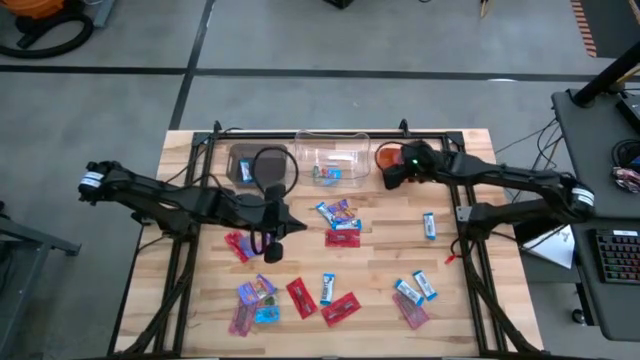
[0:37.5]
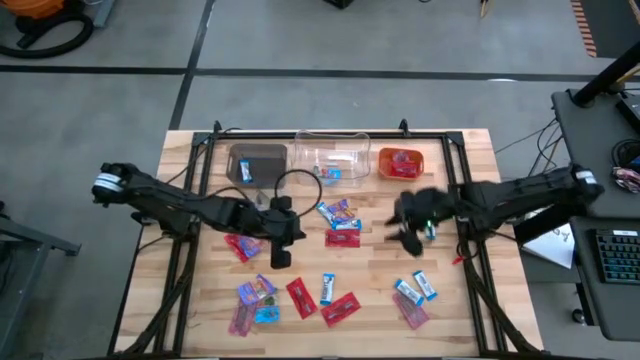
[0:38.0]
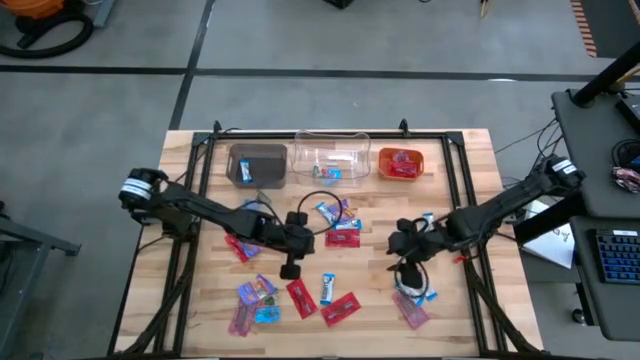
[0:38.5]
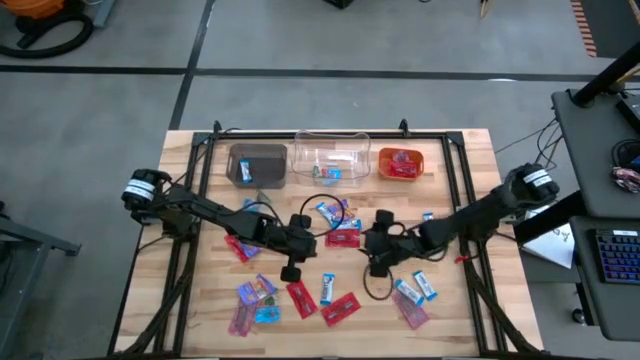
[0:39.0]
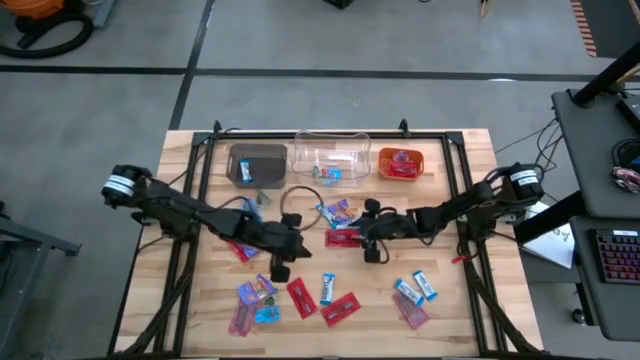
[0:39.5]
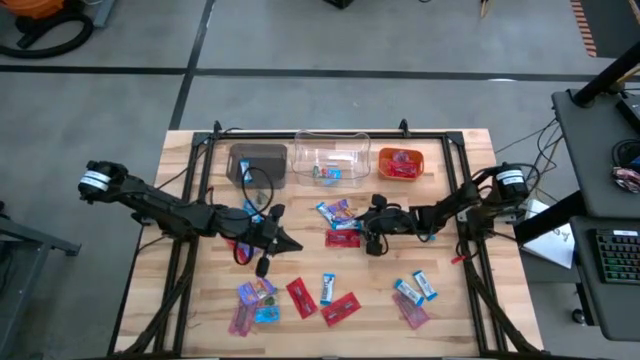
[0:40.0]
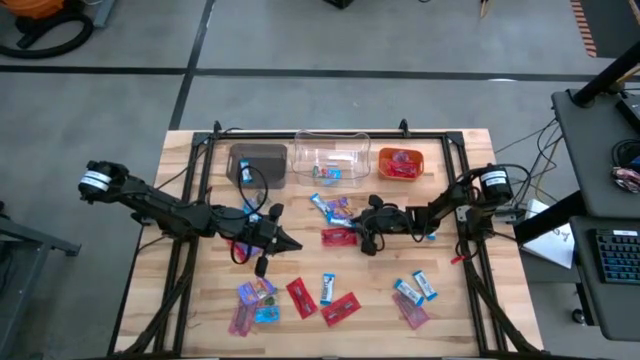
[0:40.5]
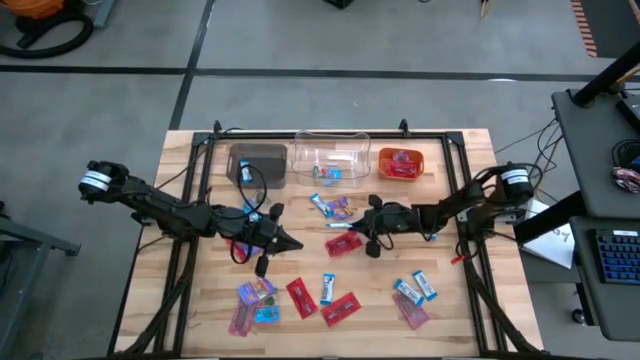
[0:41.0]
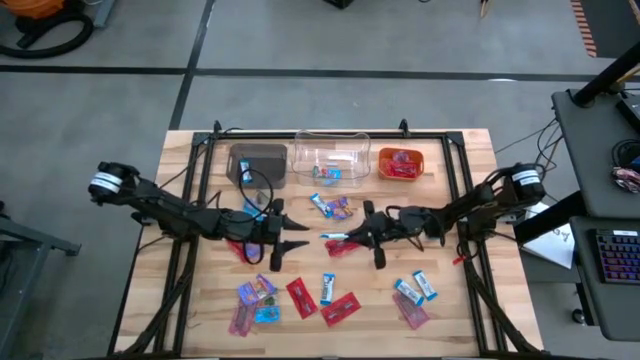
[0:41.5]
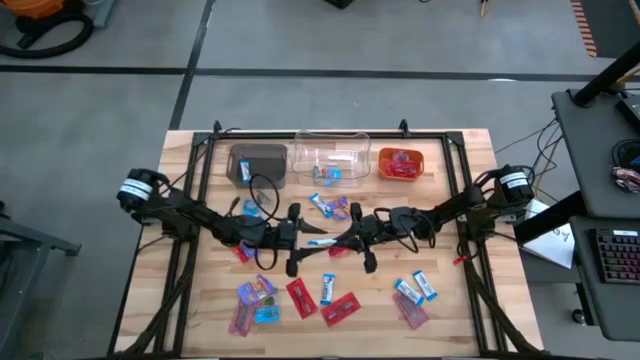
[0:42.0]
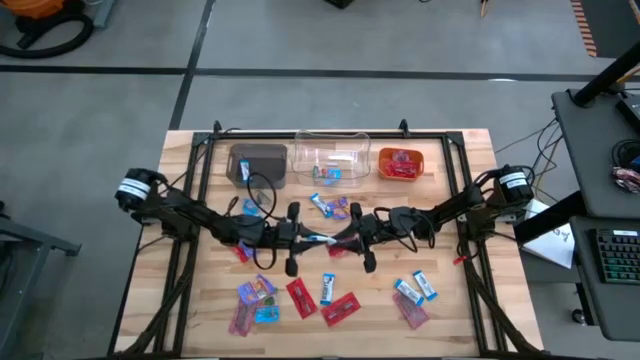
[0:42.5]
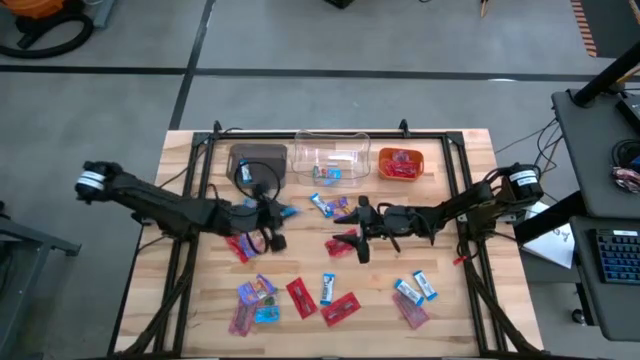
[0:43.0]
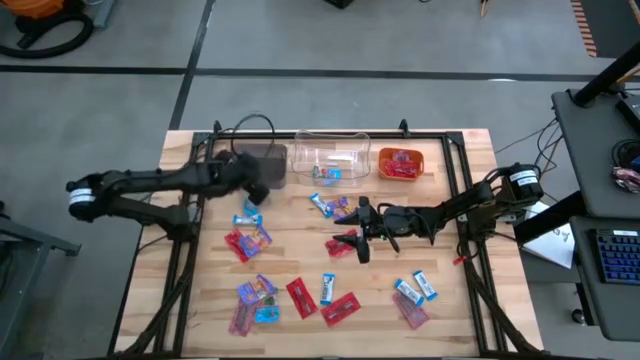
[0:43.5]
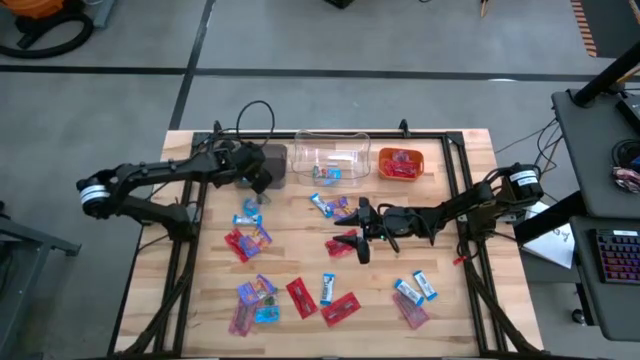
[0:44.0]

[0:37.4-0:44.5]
Task: Sort candy
Put the white candy into the black bin

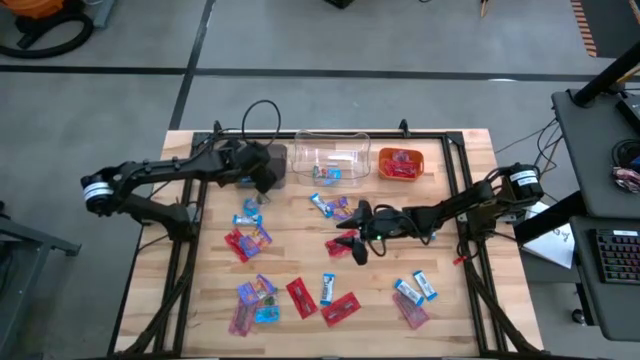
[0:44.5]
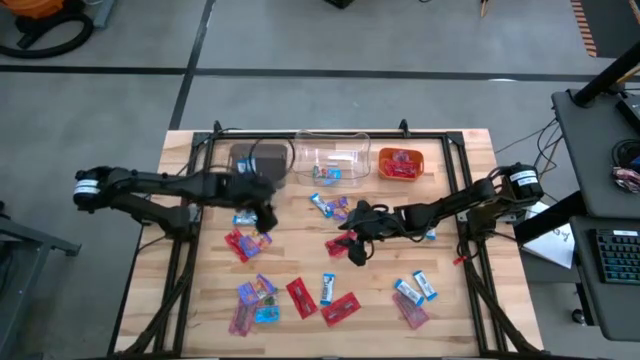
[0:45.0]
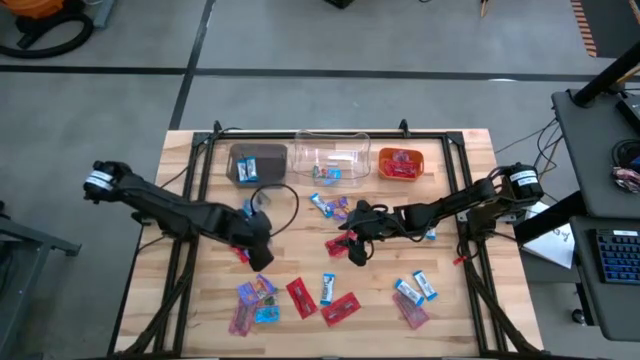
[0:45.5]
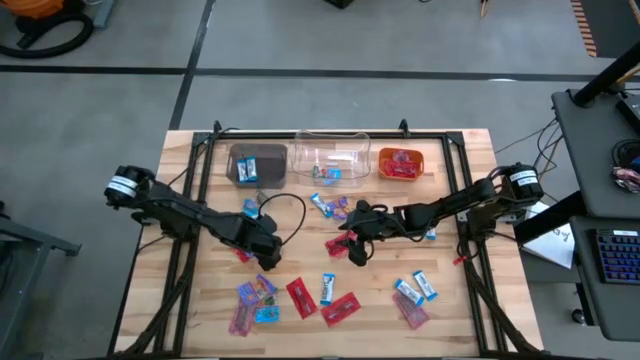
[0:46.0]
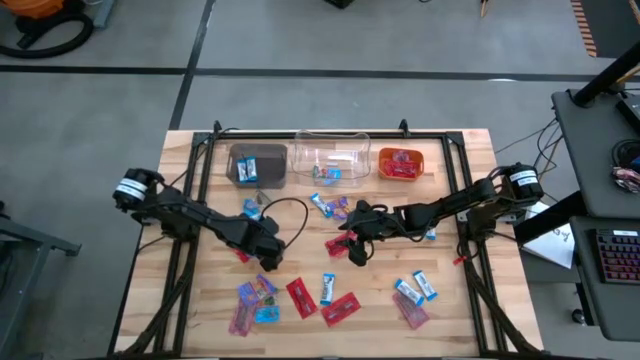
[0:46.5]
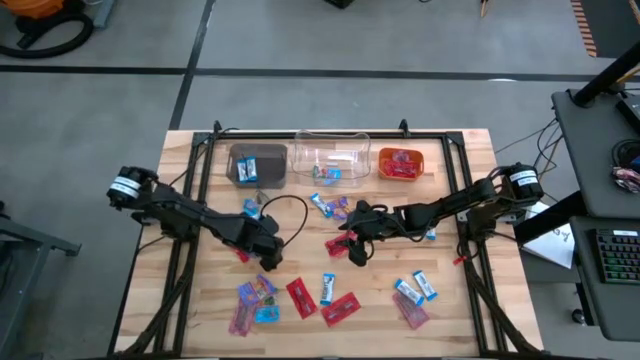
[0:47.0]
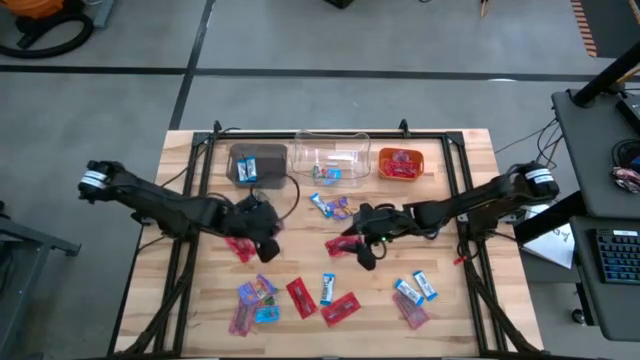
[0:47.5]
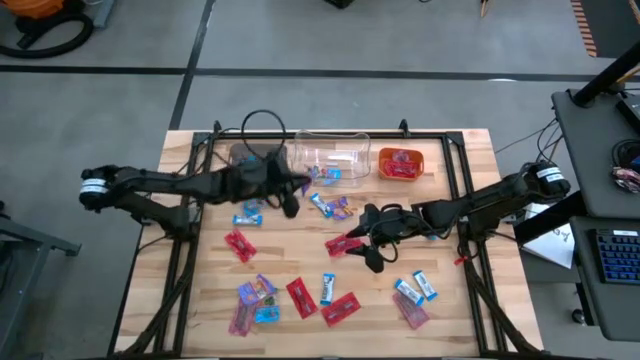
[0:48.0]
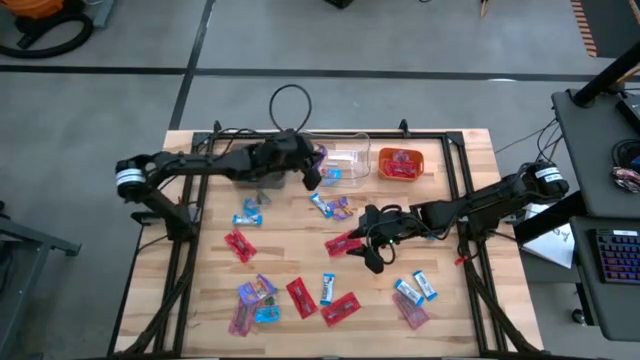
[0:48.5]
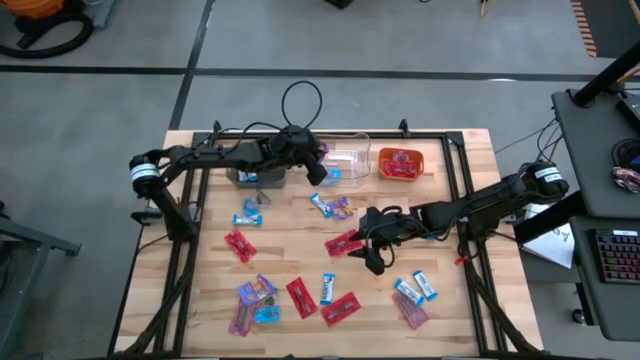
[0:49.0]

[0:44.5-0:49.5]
Put the blue candy into the transparent bin

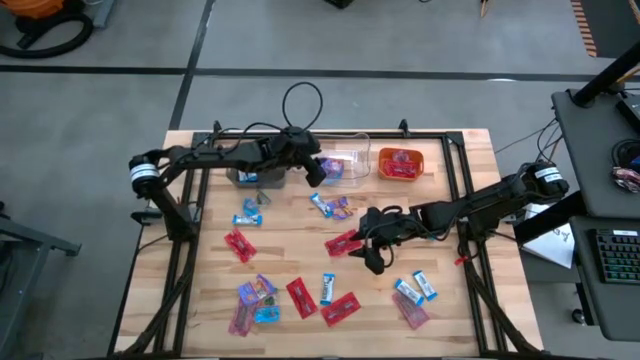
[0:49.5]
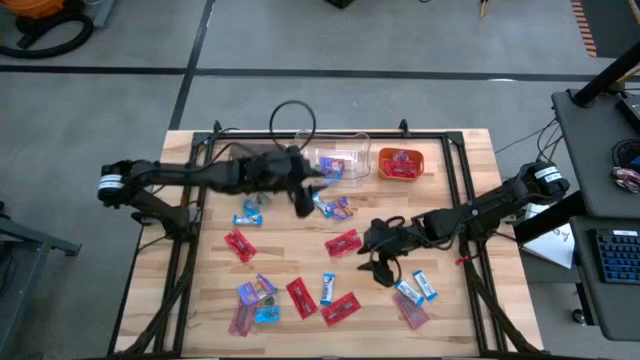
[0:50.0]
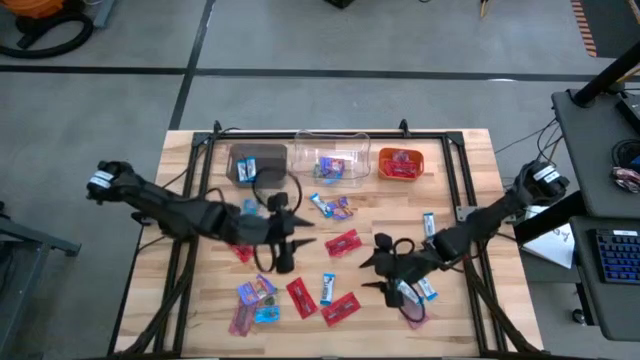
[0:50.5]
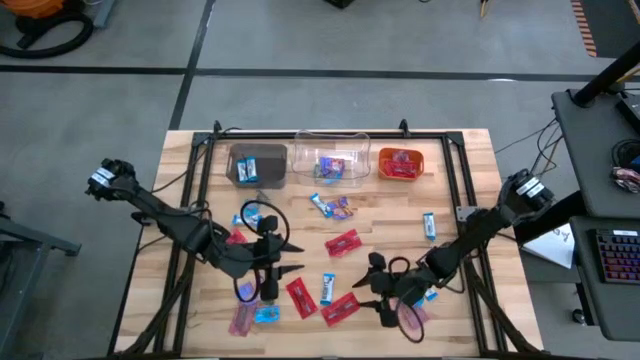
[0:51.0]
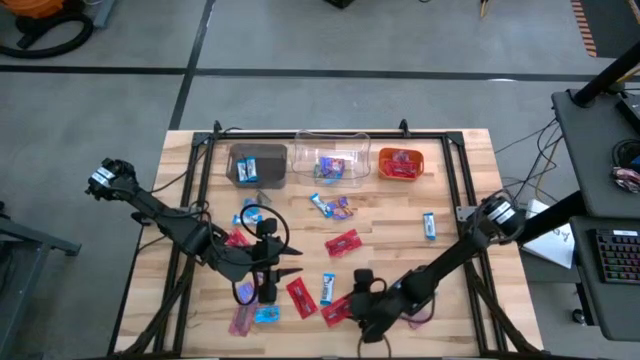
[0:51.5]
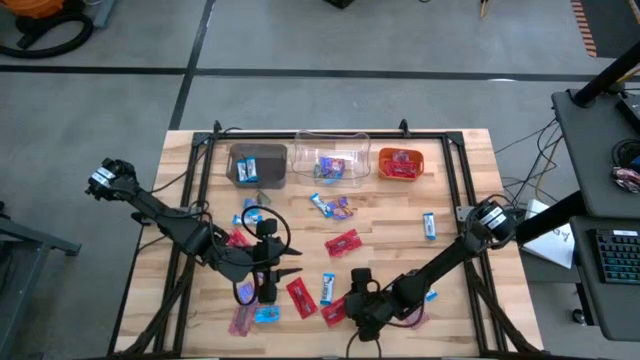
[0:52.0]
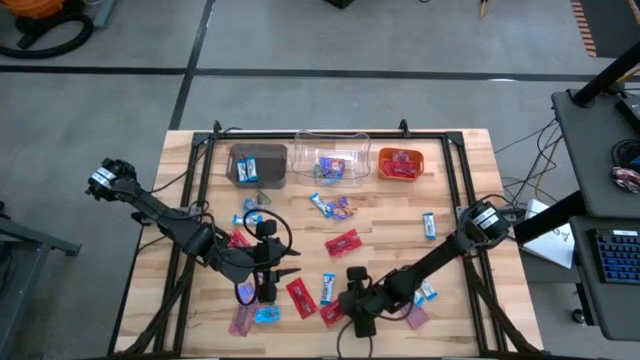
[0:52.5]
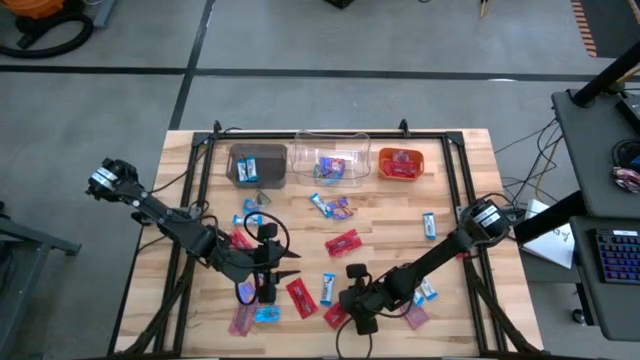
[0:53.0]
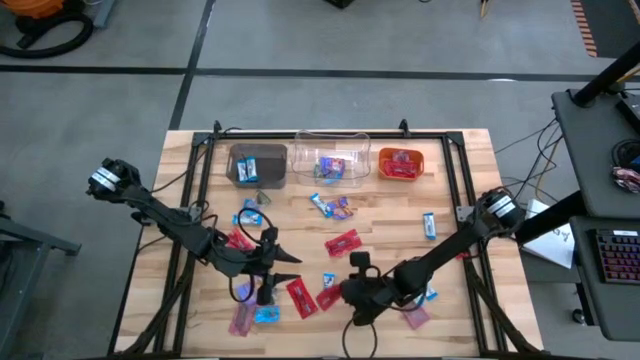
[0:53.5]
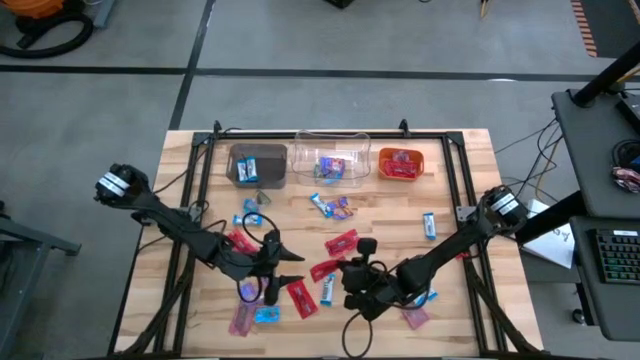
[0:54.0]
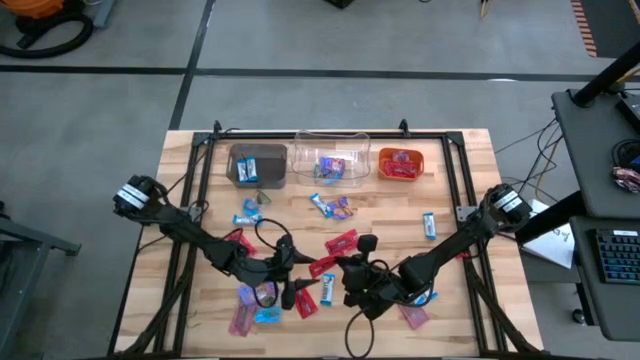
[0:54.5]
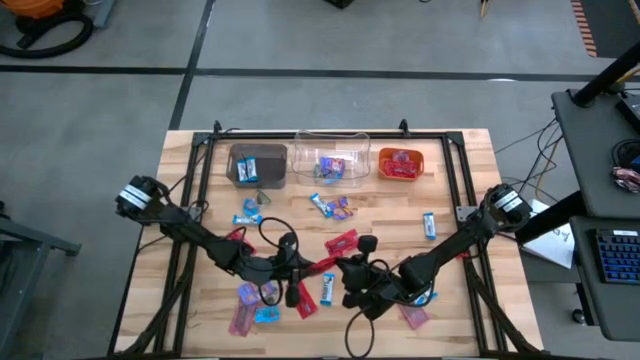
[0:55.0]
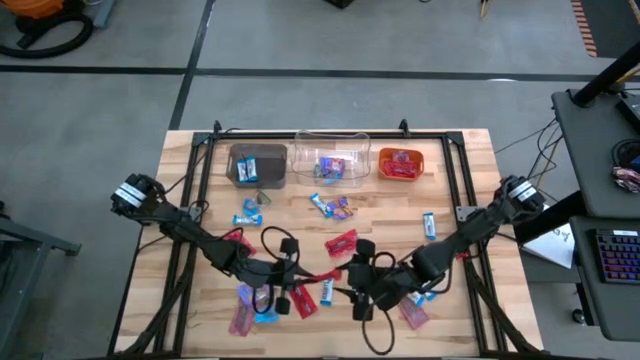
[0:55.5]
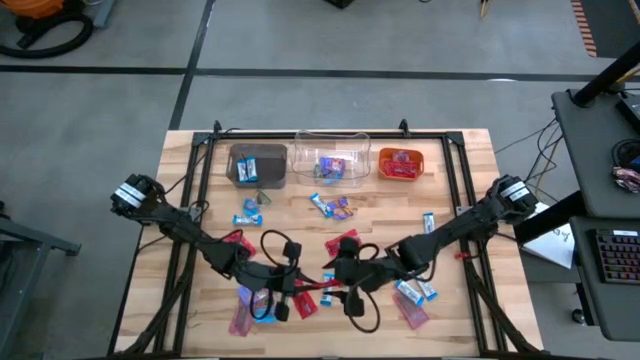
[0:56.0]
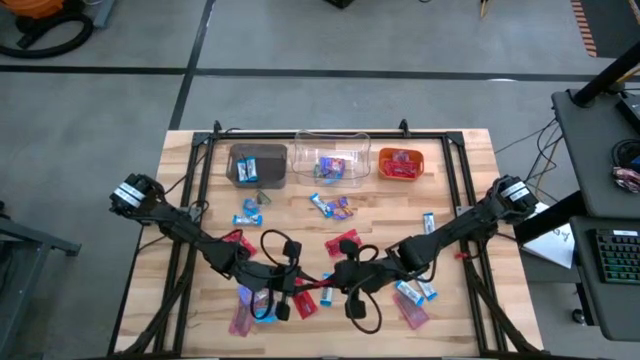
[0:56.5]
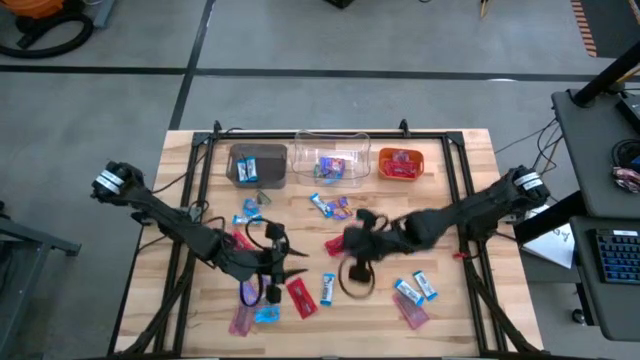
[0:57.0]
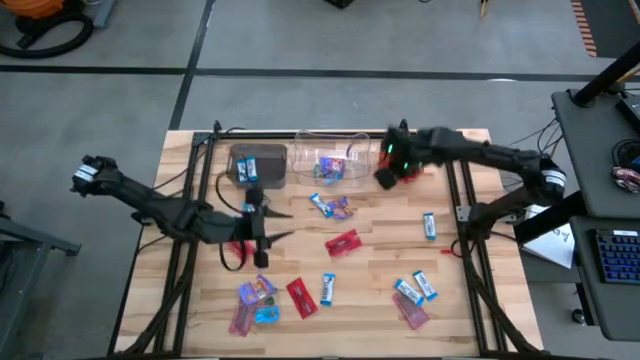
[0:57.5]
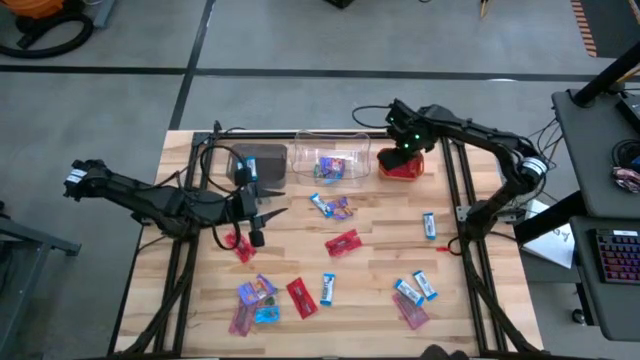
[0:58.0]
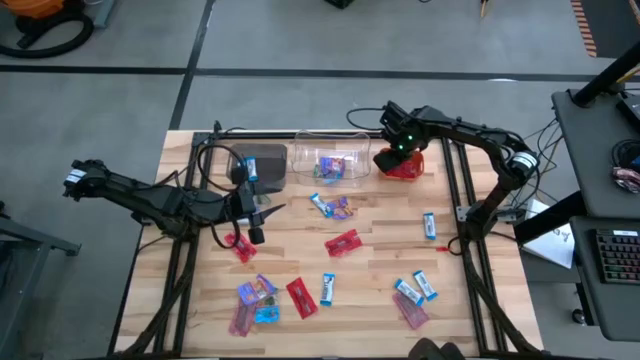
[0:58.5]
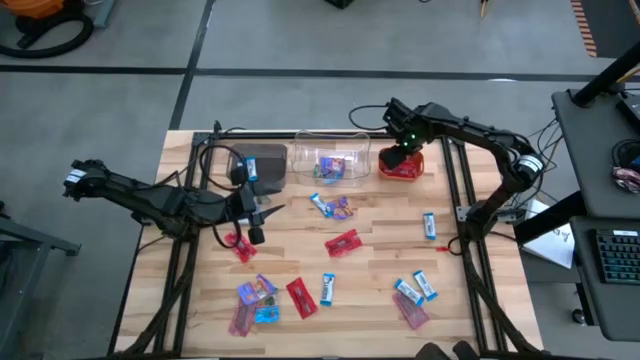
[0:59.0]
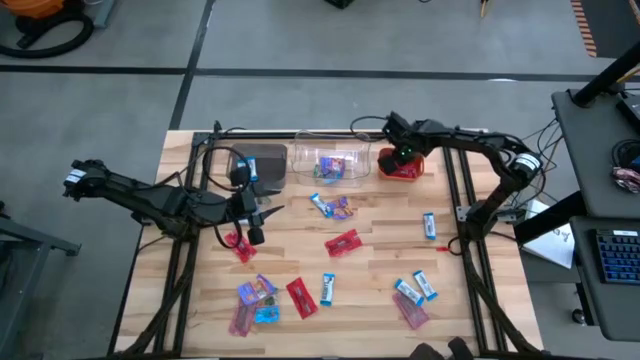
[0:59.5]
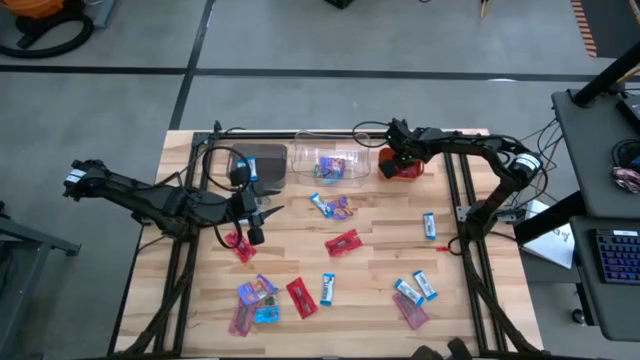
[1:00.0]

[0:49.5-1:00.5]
Put the red candy into the orange bin
